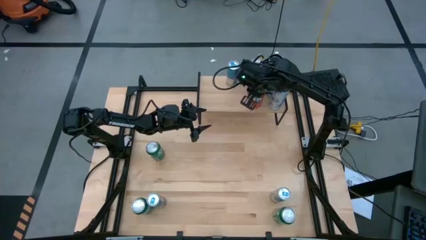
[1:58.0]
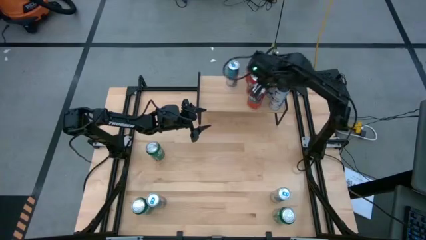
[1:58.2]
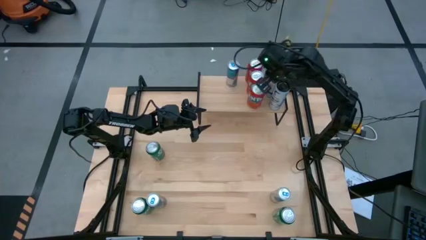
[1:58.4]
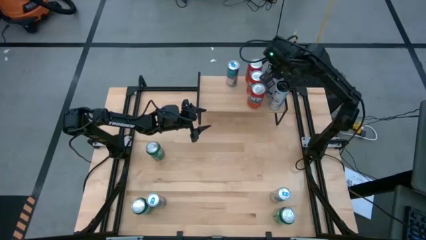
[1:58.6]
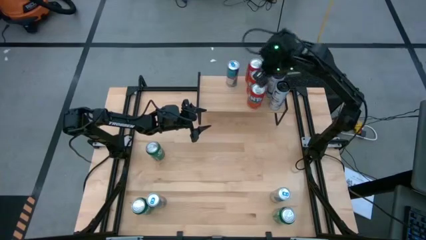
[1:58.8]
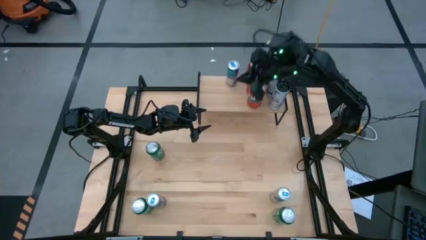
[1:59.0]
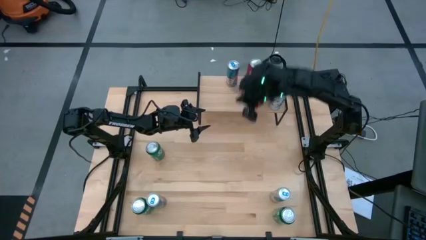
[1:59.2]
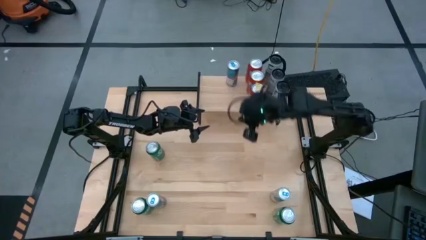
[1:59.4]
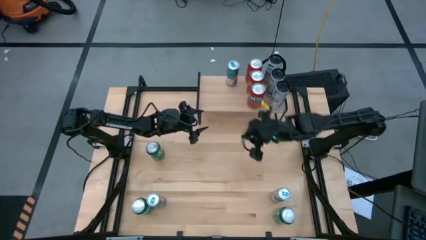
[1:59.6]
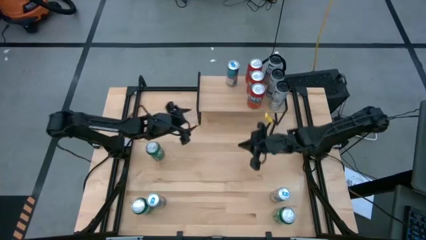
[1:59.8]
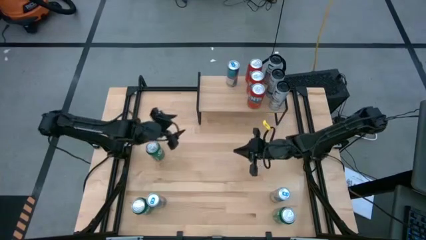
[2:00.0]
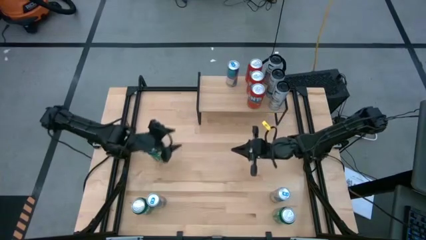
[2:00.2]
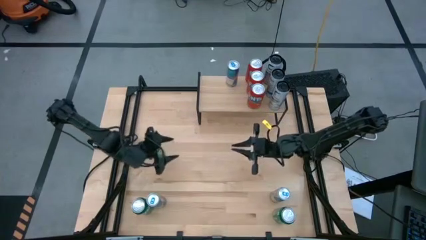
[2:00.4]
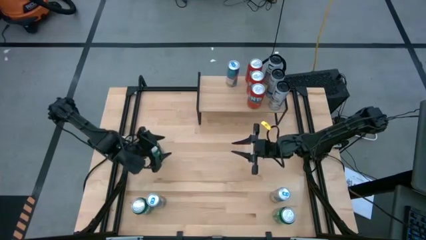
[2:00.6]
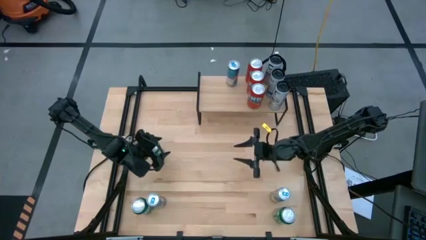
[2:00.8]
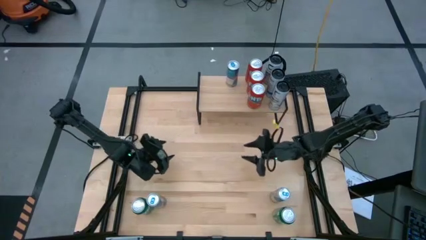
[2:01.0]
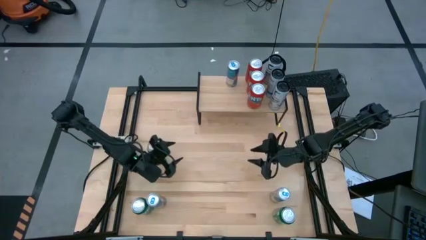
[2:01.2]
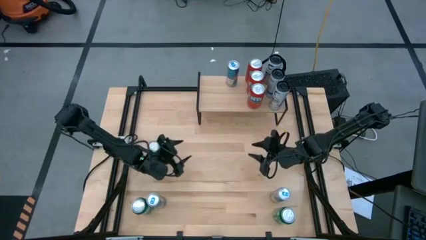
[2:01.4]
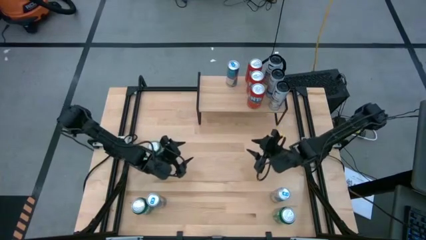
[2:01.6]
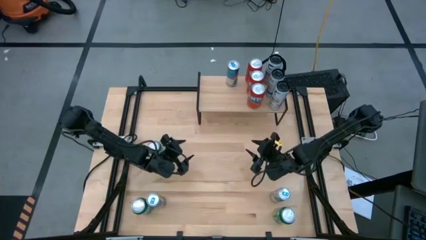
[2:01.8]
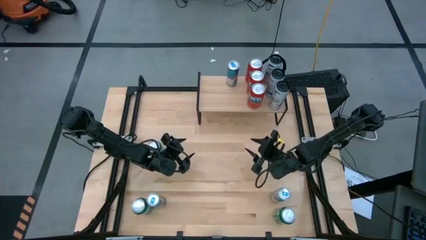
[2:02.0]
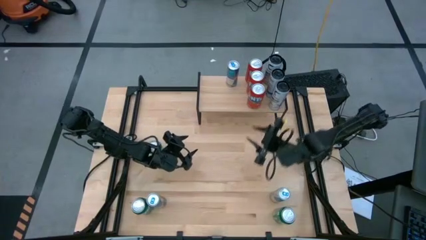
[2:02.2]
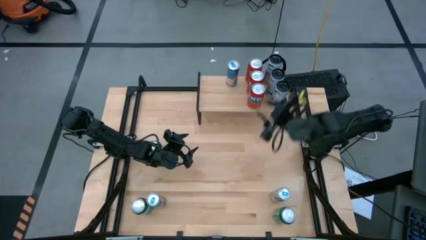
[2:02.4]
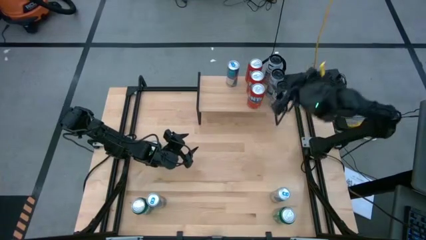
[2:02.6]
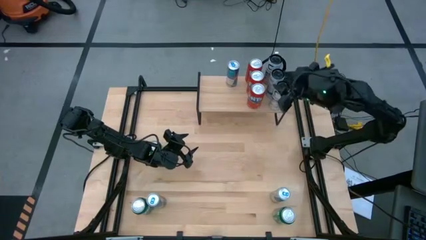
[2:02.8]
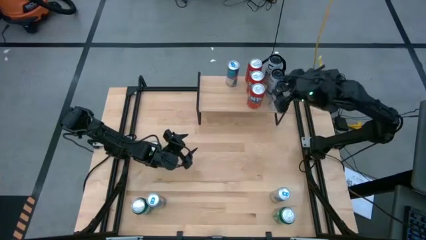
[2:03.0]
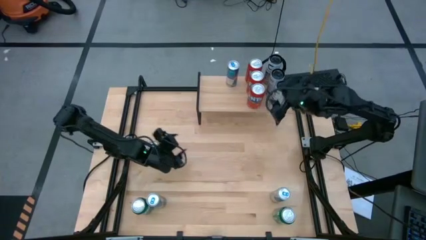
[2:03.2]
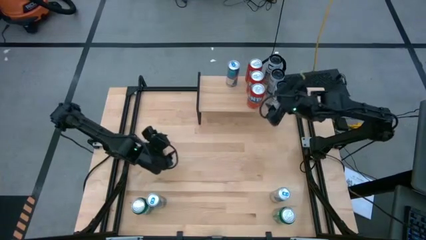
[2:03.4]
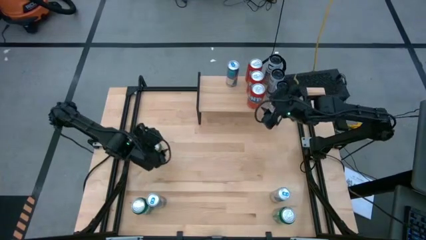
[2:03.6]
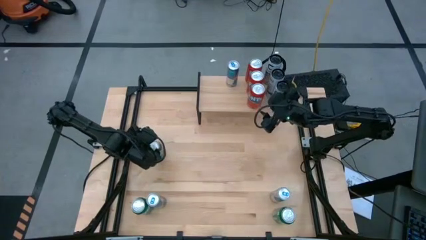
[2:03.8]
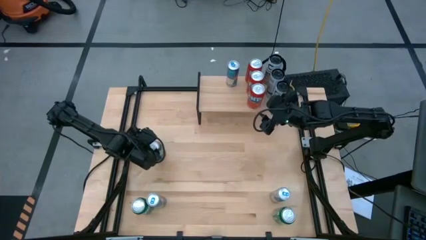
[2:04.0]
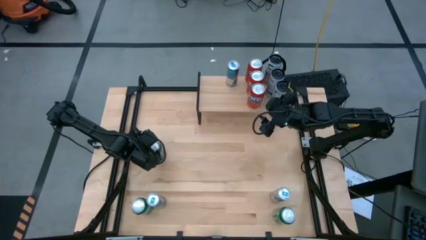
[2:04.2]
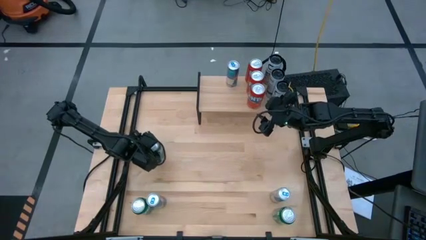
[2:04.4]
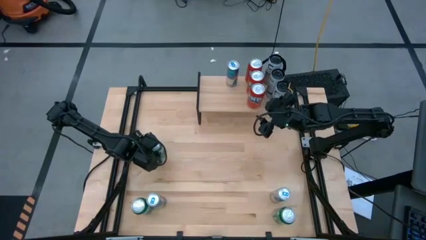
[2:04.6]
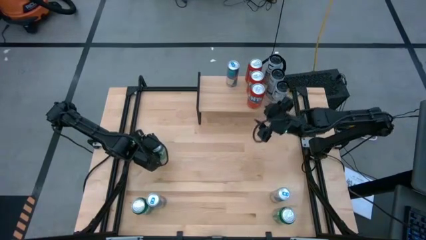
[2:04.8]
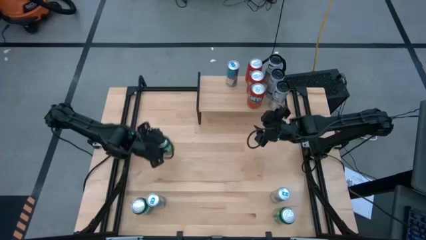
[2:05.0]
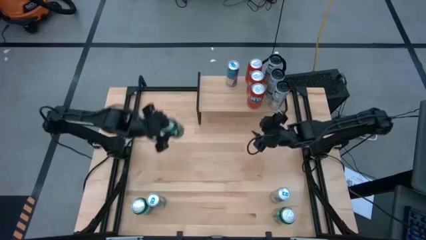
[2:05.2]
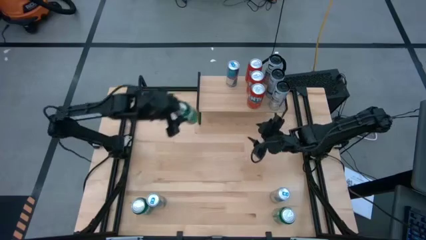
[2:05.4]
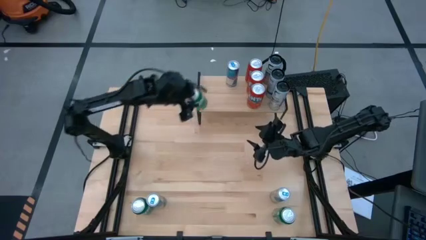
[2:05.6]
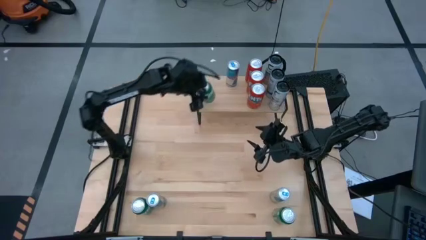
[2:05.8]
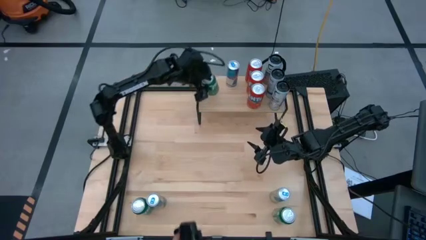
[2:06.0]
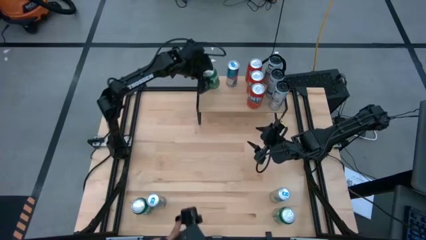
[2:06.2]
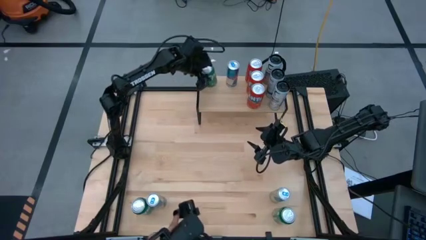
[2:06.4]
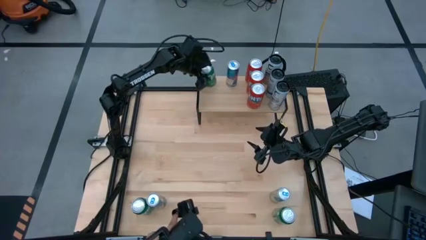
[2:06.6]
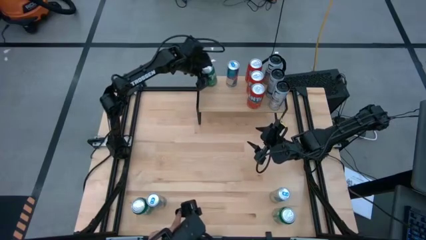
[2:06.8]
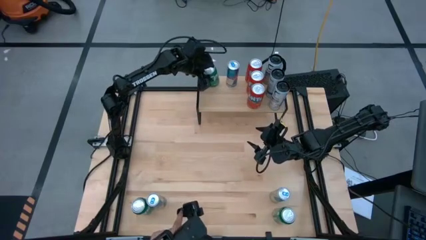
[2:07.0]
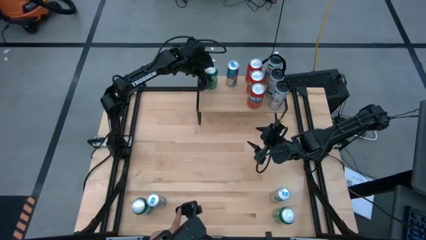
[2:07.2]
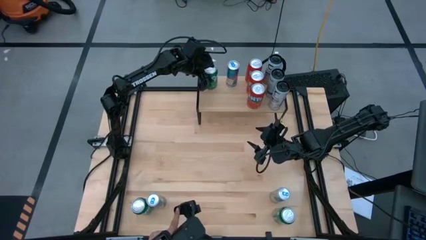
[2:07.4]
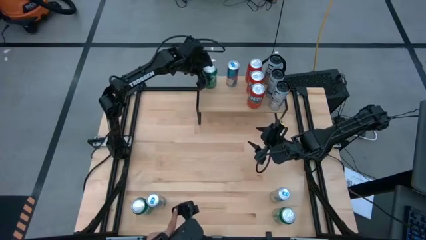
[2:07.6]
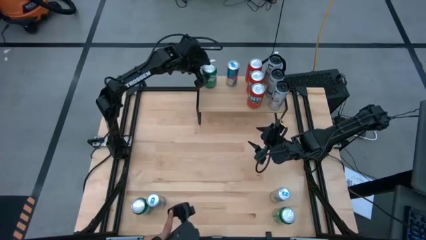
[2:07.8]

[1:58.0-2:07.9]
Task: Place canned beverage on shelf
Put the top green soda can on the shelf

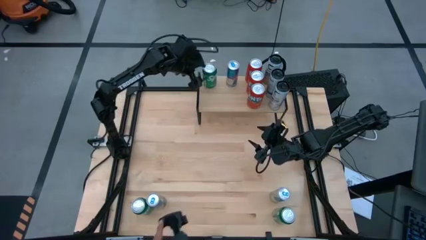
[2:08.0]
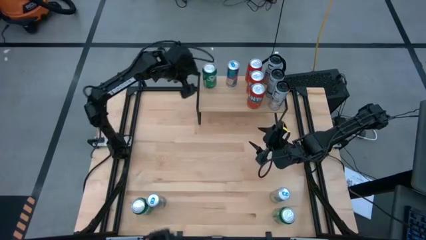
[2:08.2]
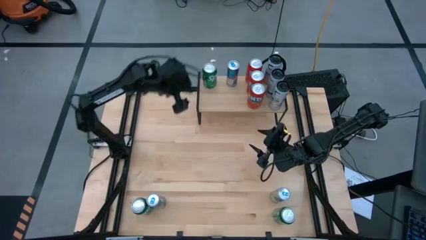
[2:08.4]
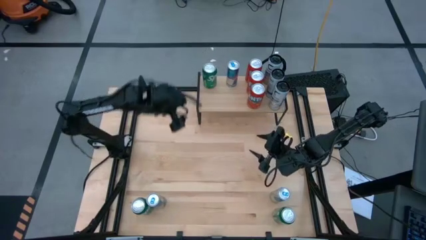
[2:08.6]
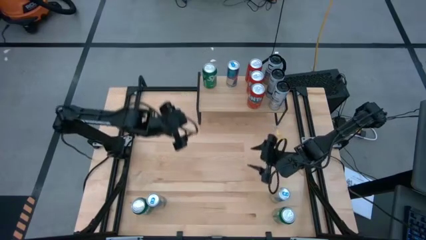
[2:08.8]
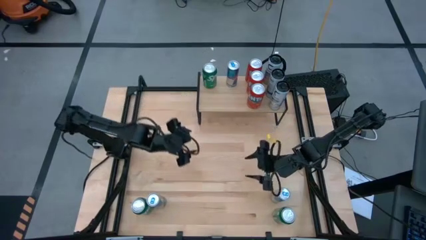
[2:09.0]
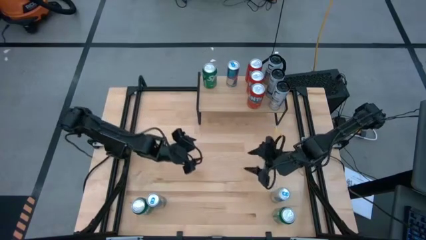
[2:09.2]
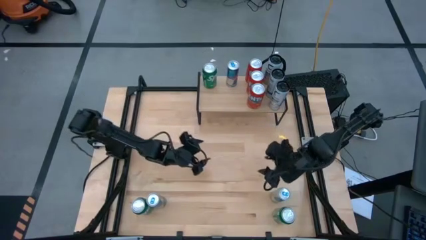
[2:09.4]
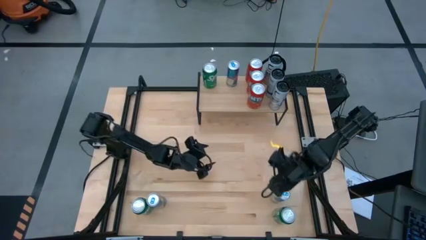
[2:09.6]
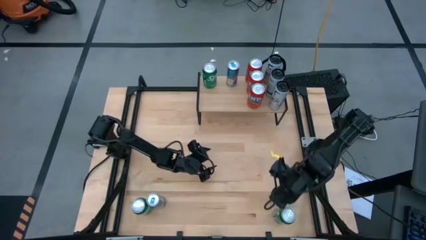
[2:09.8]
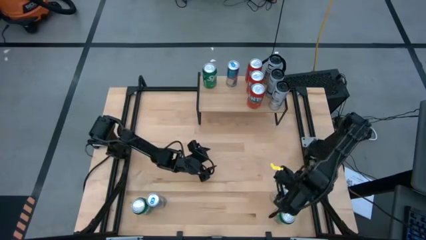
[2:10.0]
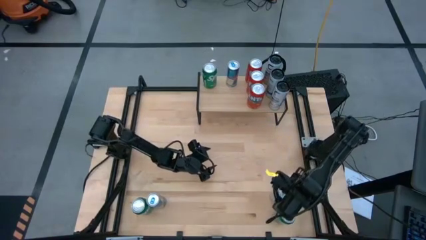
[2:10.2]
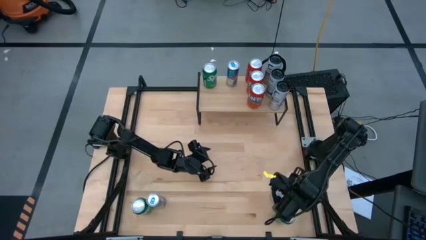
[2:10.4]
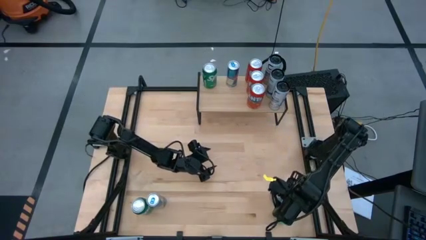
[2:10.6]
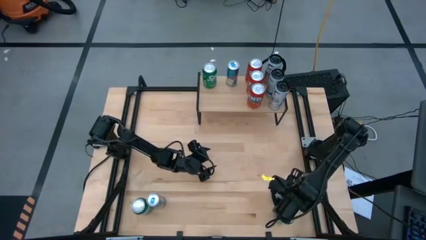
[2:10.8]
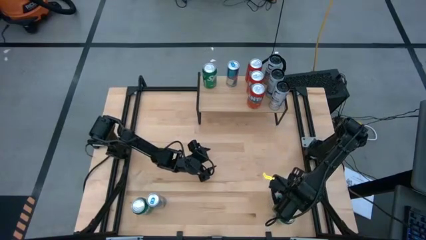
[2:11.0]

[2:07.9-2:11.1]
Put the right blue soda can on the shelf aligned with the other blue soda can

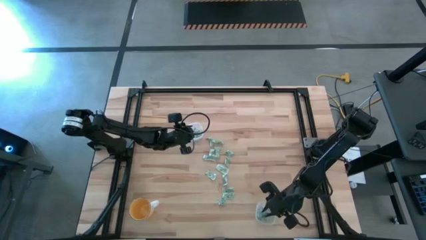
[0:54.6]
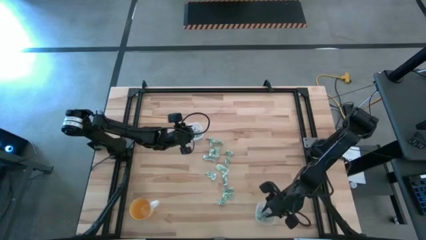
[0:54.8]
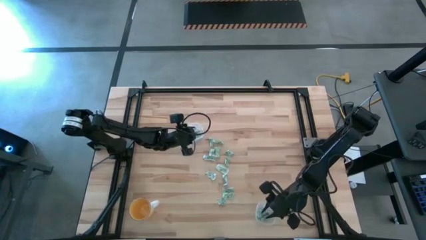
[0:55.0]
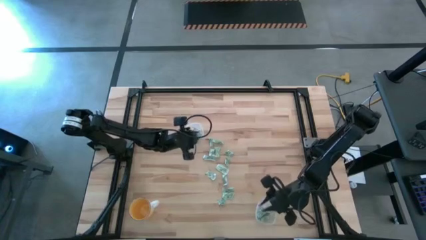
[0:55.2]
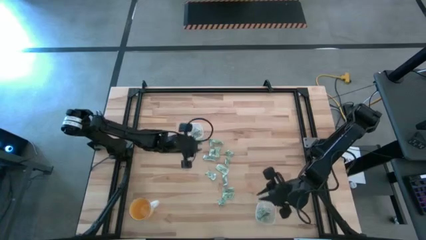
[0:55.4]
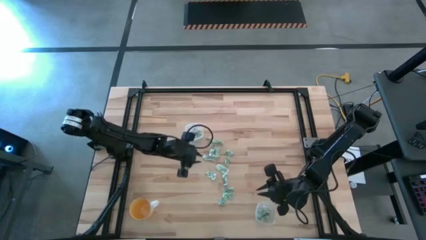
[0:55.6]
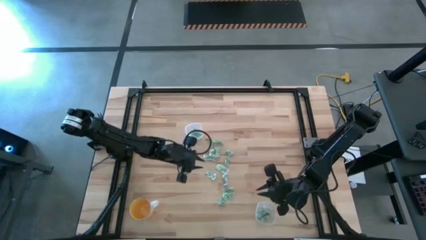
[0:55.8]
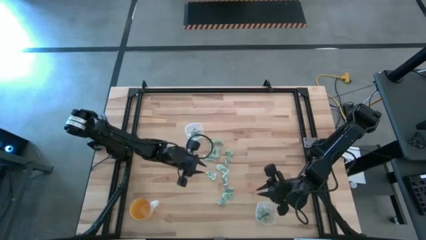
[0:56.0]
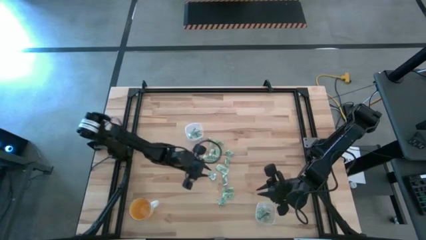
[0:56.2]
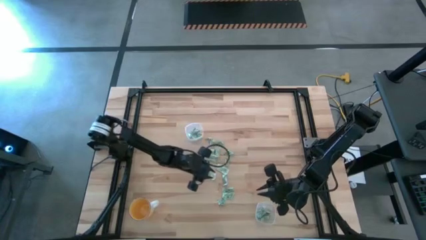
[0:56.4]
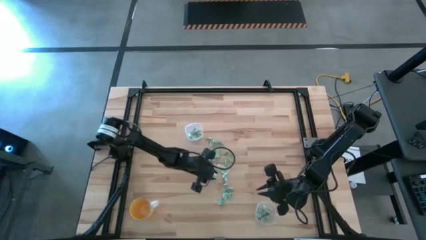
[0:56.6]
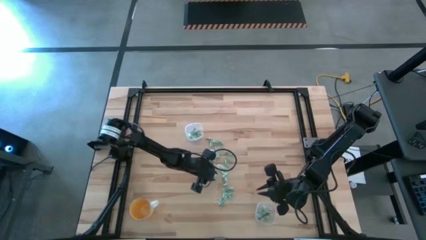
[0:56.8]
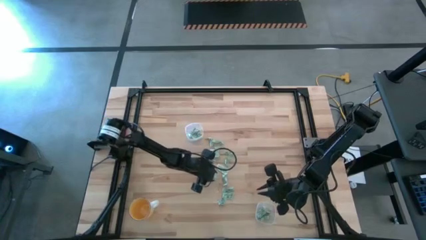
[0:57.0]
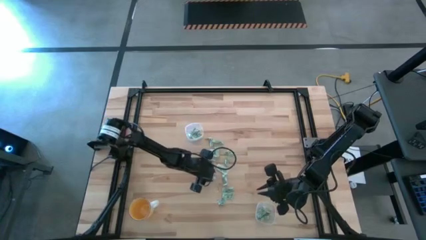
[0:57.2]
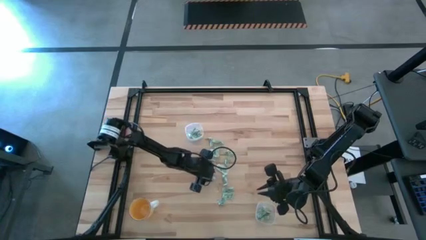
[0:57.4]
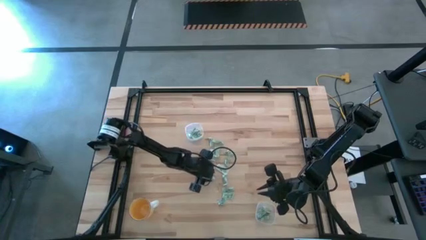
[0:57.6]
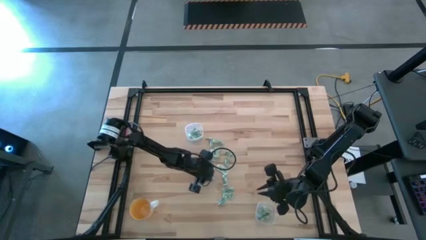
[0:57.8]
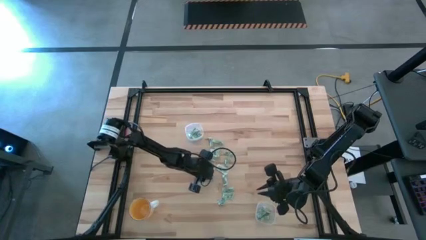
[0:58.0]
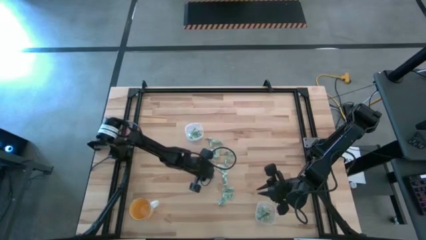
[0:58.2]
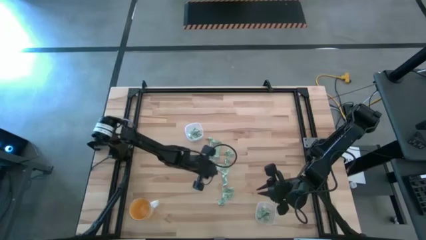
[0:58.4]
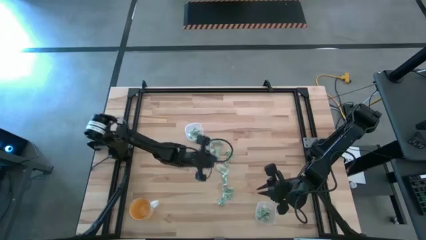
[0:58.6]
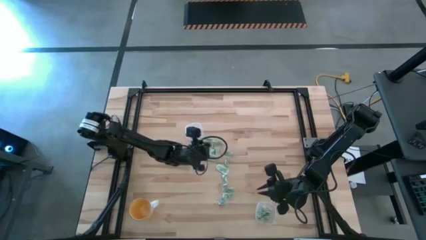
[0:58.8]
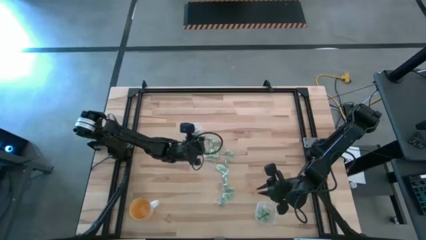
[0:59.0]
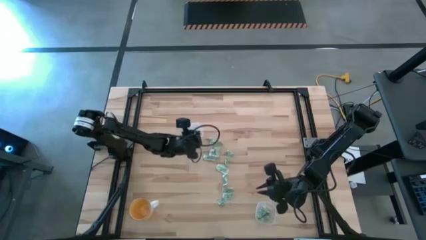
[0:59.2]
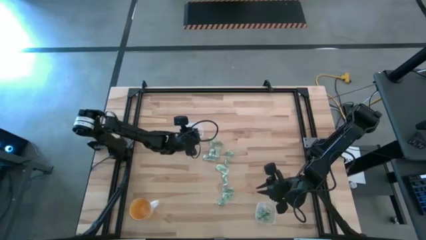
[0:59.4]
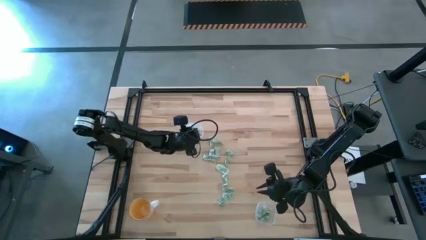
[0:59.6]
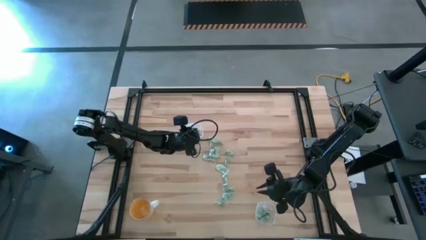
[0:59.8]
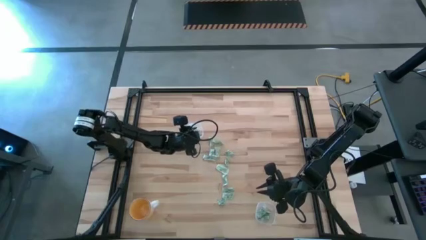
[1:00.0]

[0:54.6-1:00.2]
Task: Pick and place Stevia / Truvia into bins
Put the stevia packet into the top transparent container
